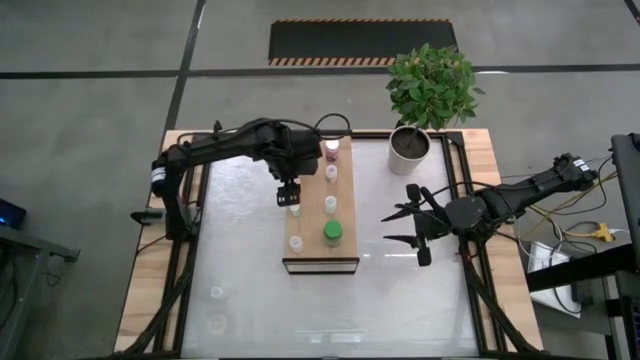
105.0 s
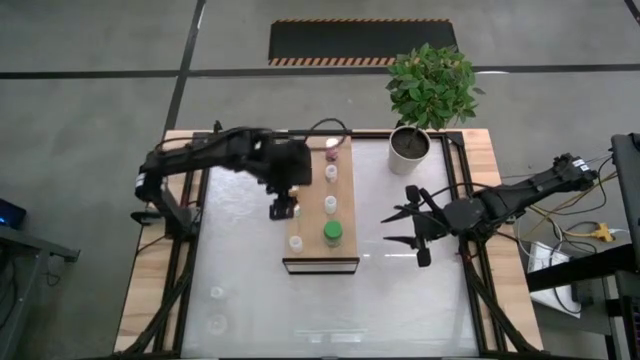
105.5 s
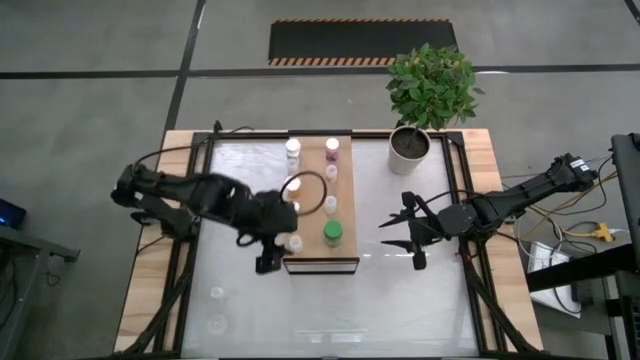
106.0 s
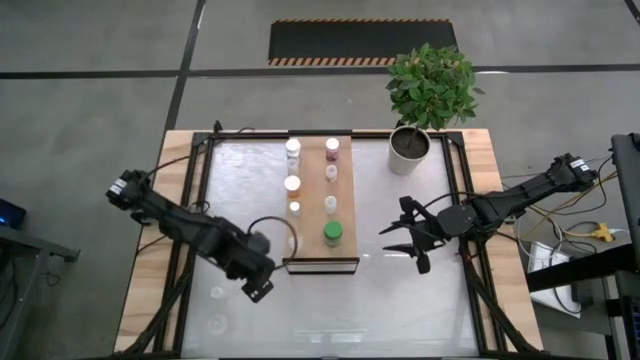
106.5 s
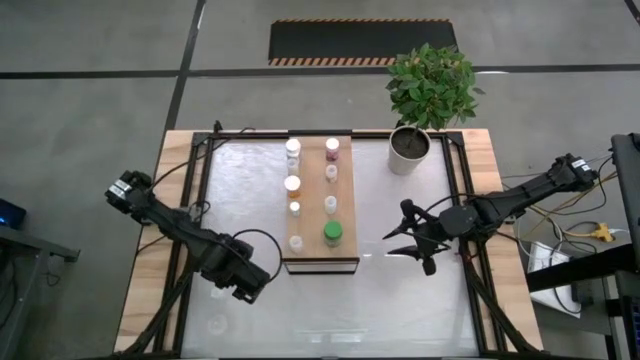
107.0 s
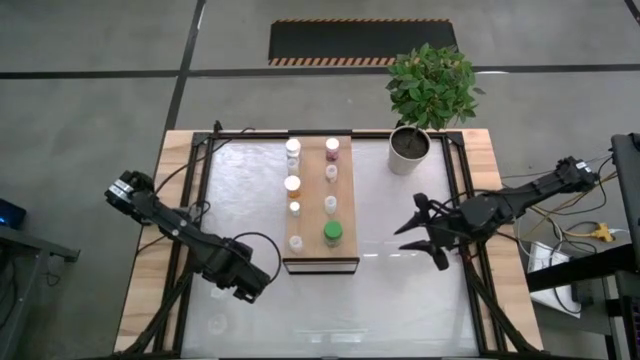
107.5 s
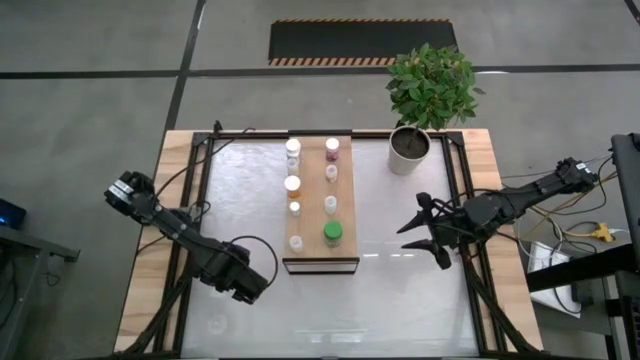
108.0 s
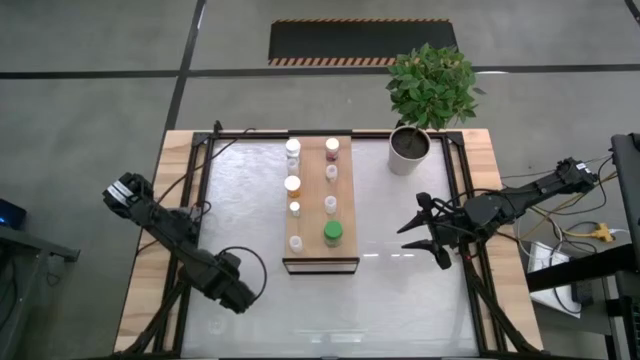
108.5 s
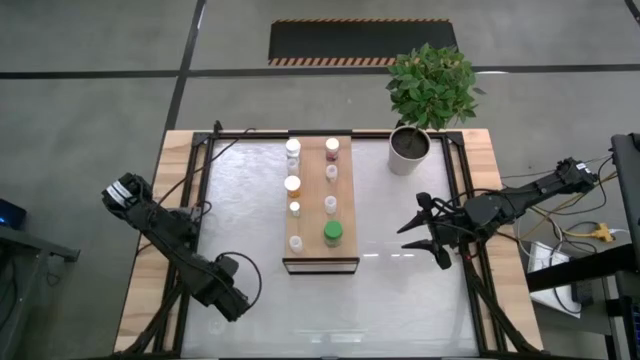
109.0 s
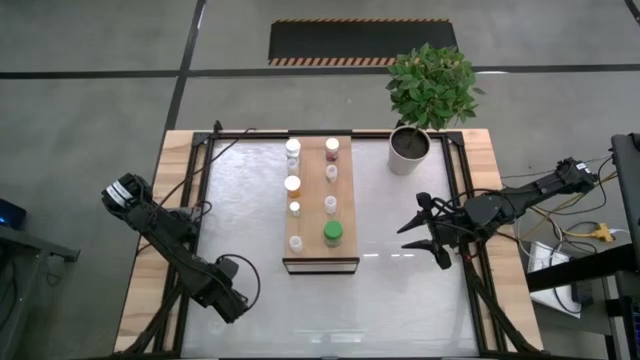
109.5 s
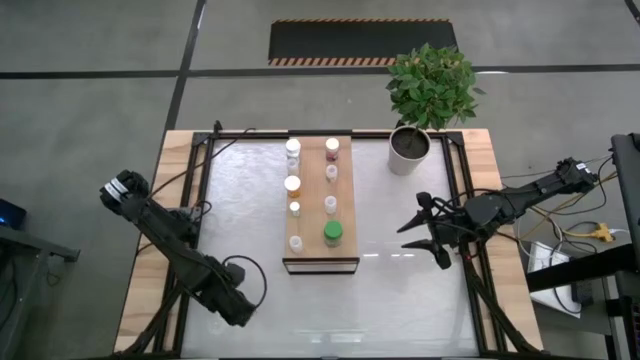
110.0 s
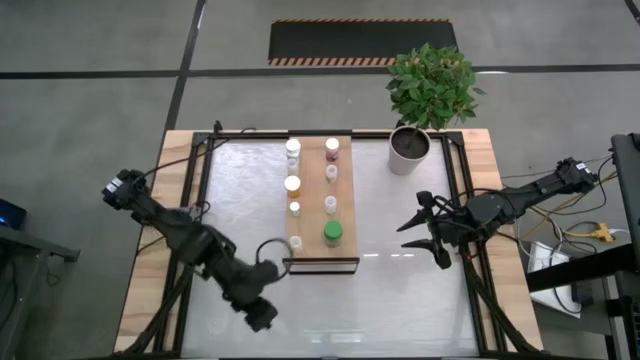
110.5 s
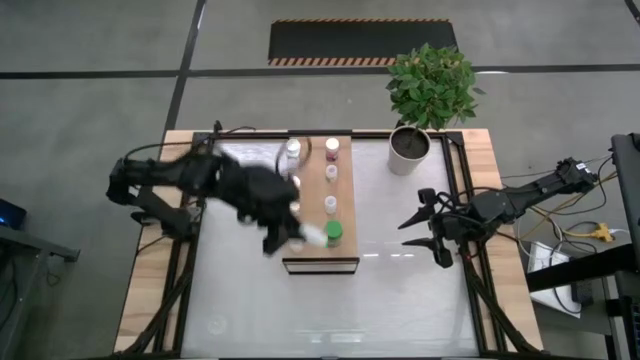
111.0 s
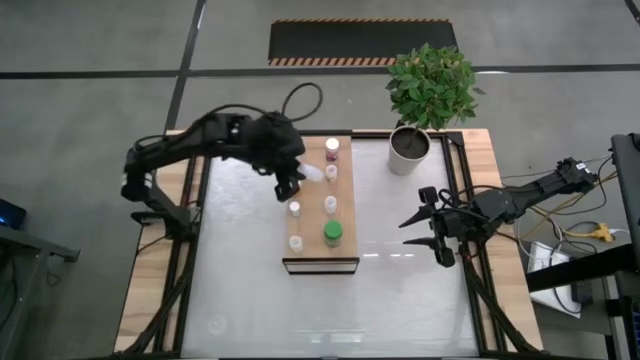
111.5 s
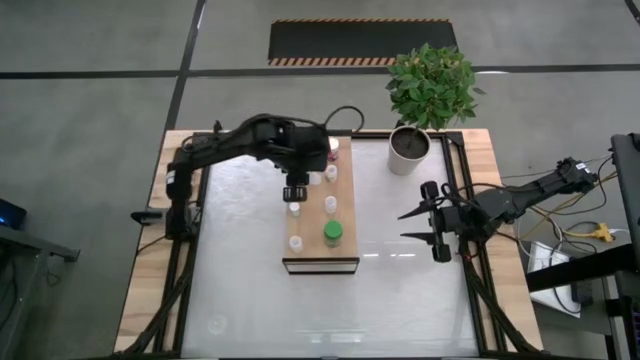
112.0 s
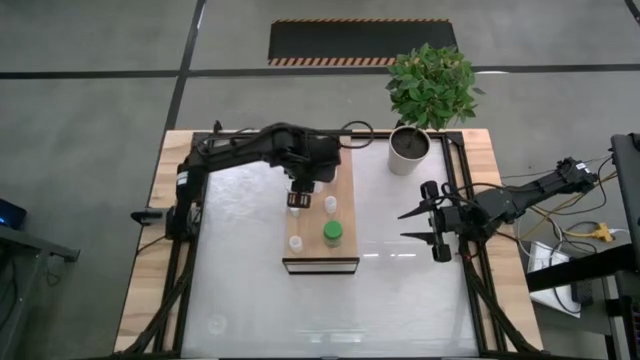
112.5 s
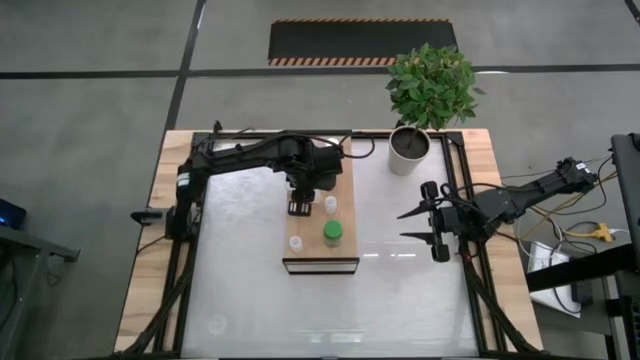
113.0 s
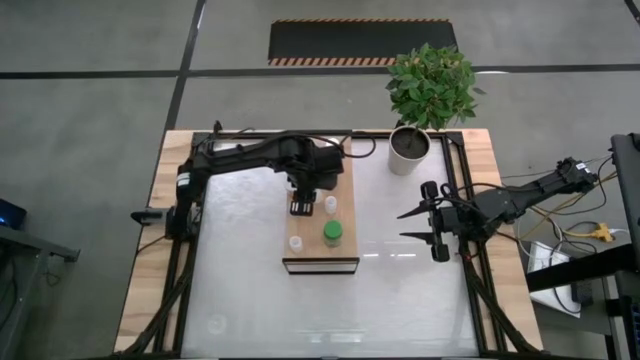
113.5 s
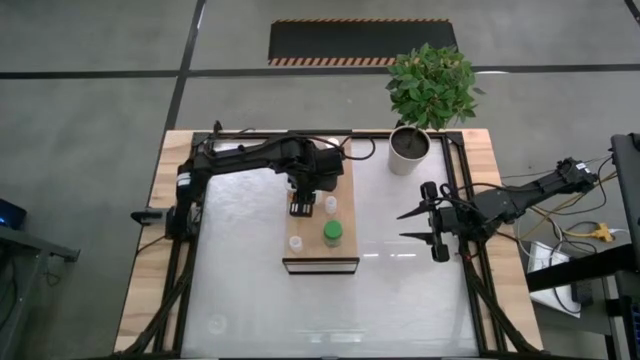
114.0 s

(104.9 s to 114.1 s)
Task: Pick and place medicine bottles onto shelf by color
Put the transparent pill bottle on the shelf

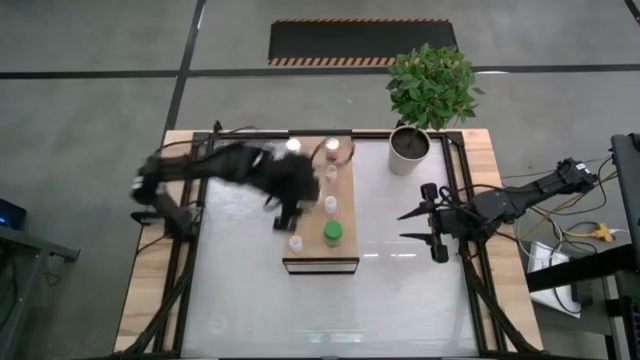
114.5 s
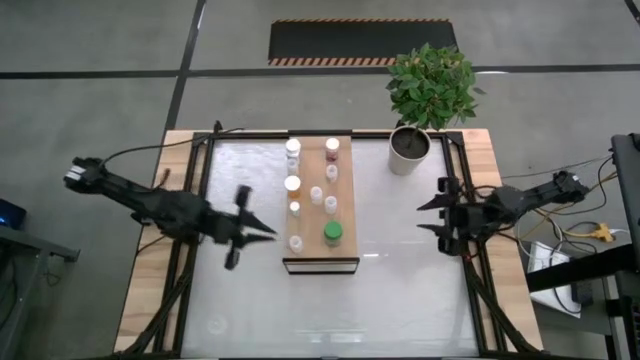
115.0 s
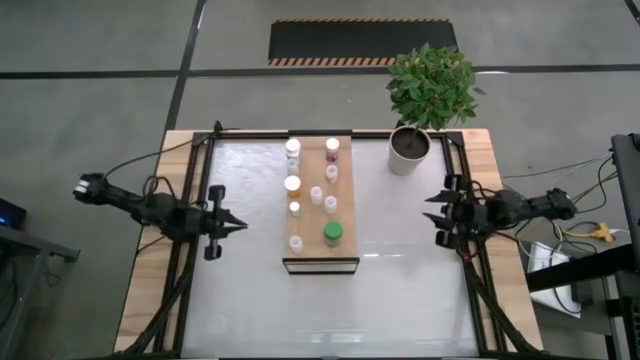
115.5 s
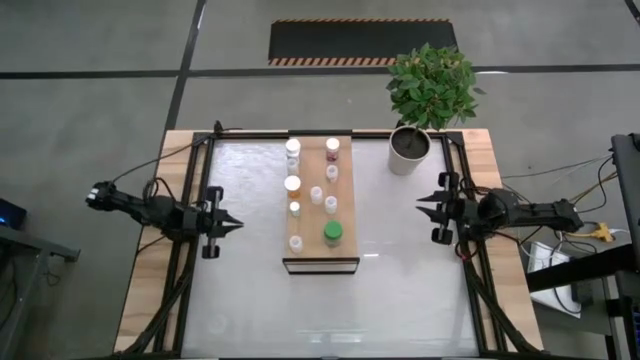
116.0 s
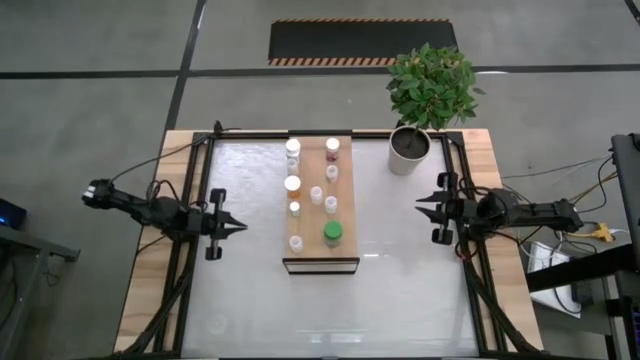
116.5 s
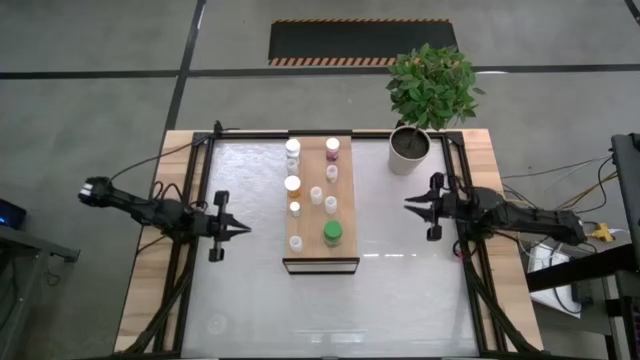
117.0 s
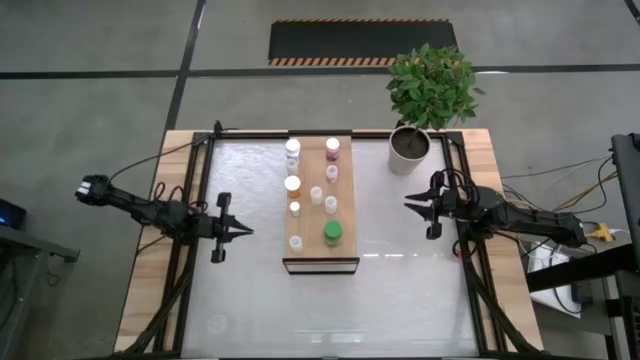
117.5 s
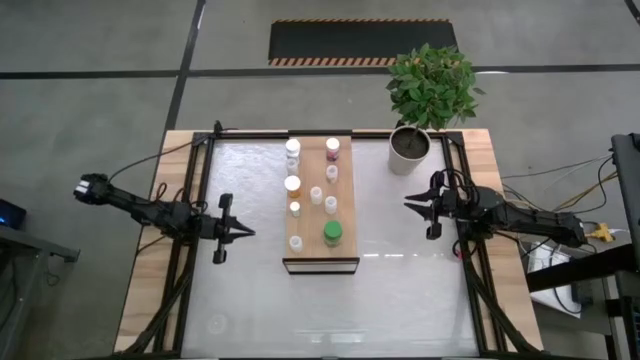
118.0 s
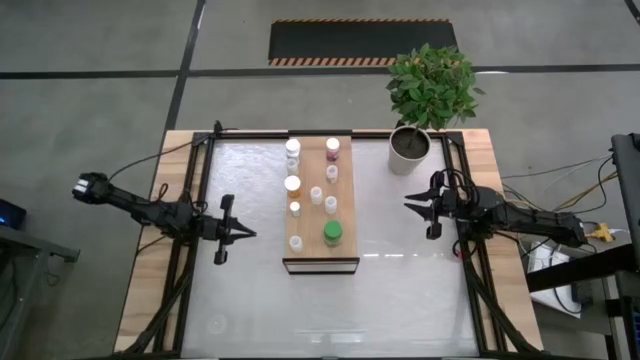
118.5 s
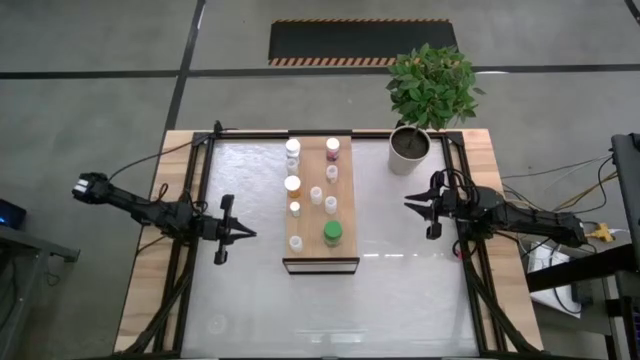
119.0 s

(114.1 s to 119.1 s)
Return to Home Position

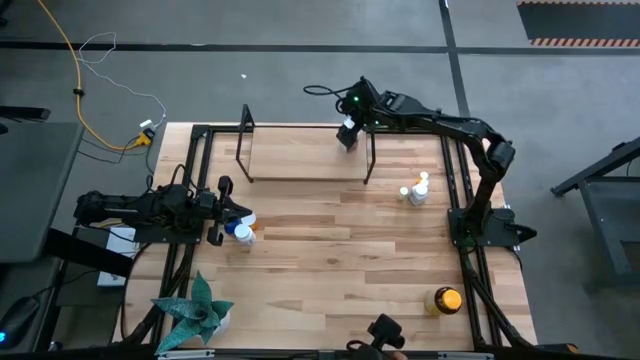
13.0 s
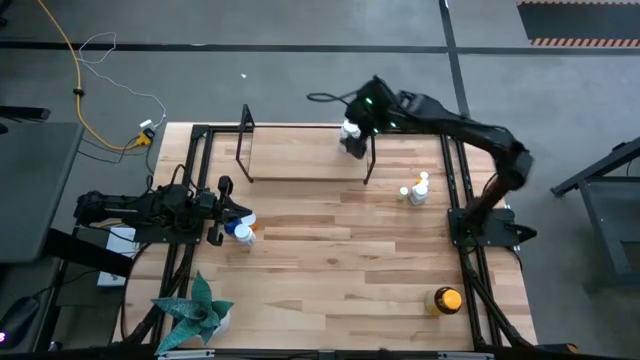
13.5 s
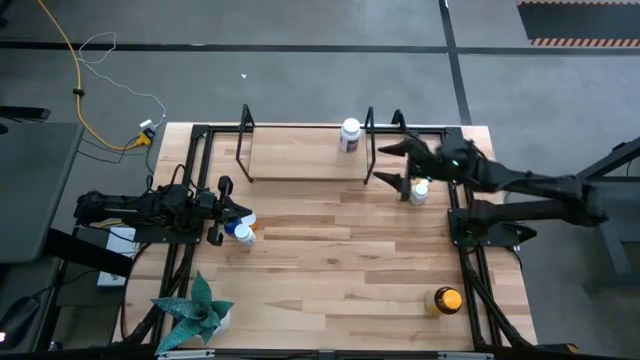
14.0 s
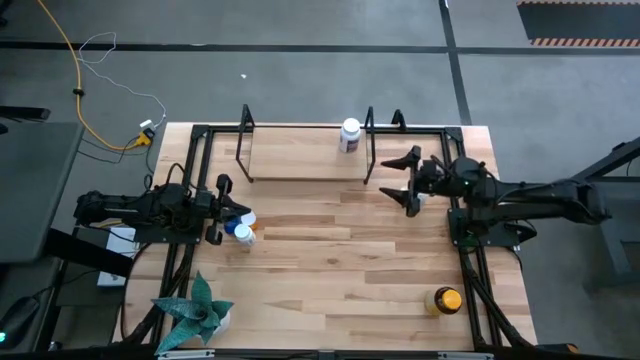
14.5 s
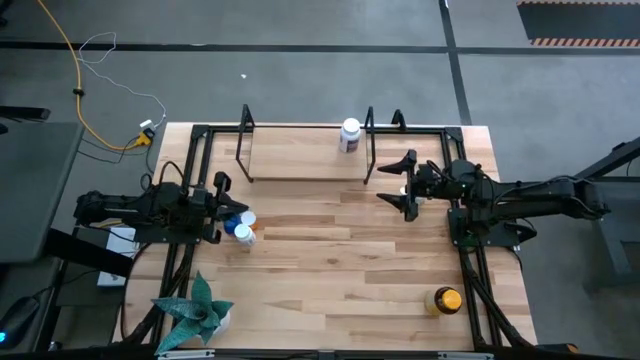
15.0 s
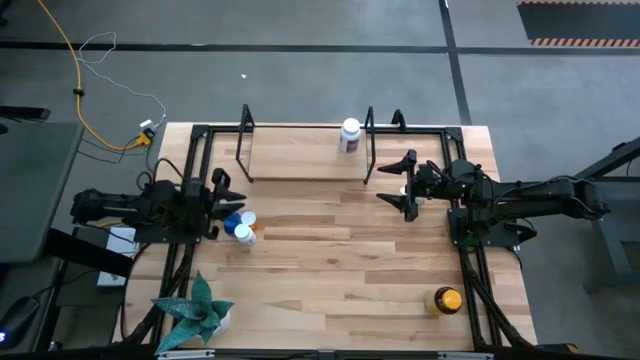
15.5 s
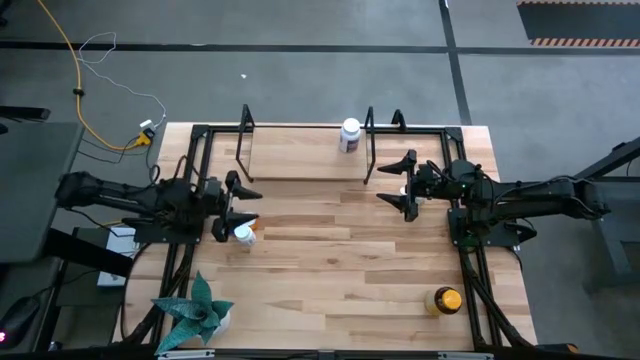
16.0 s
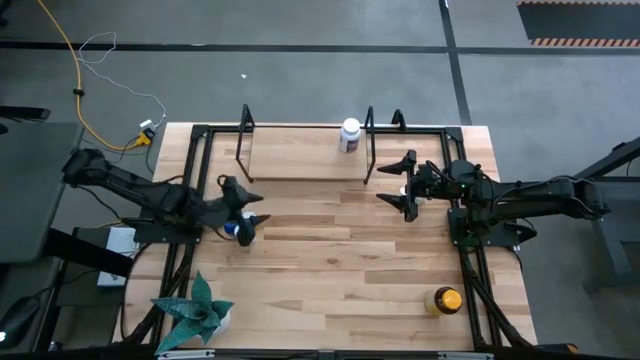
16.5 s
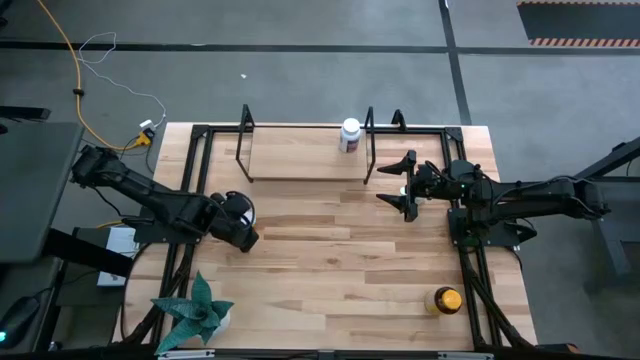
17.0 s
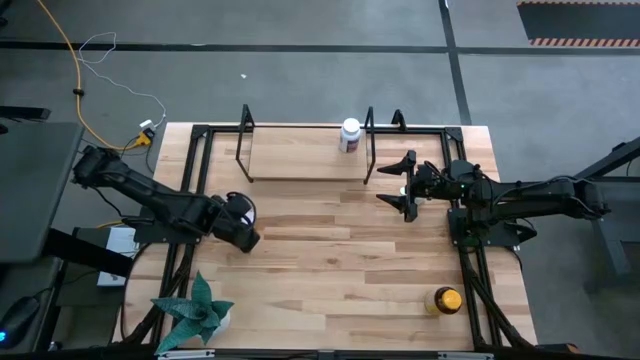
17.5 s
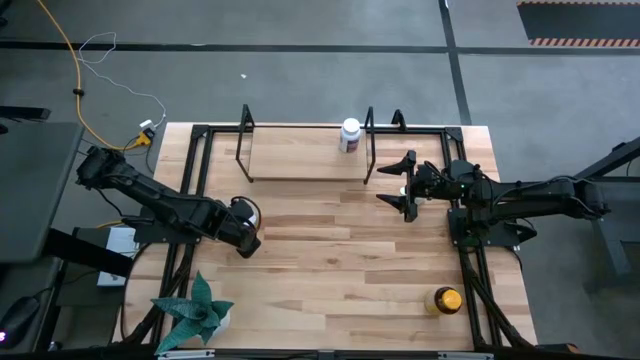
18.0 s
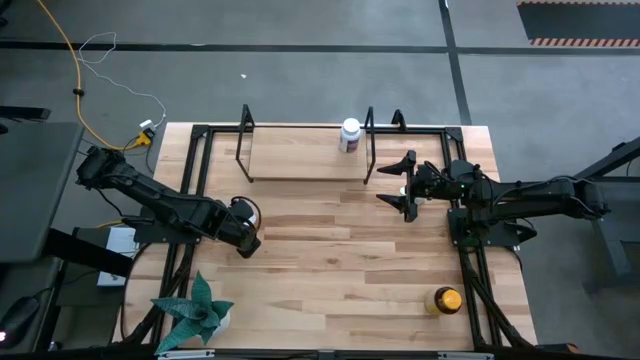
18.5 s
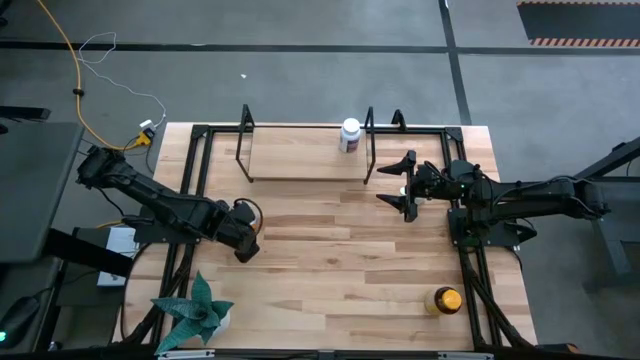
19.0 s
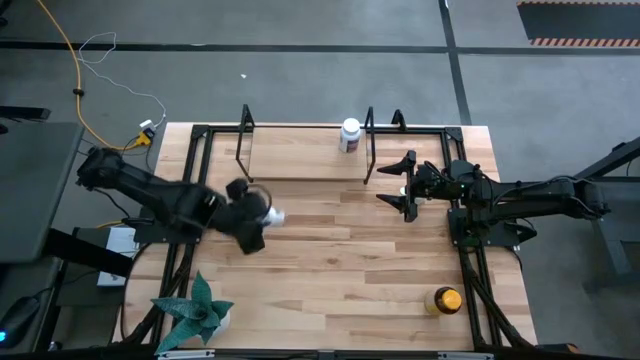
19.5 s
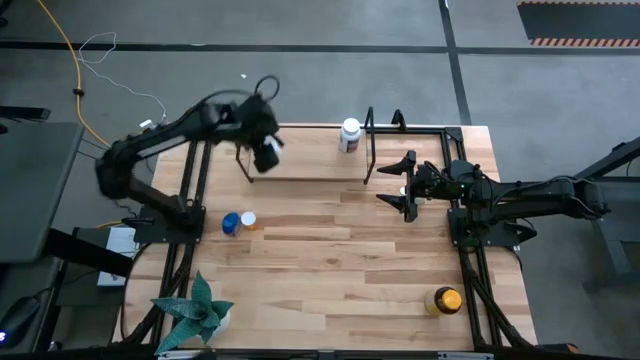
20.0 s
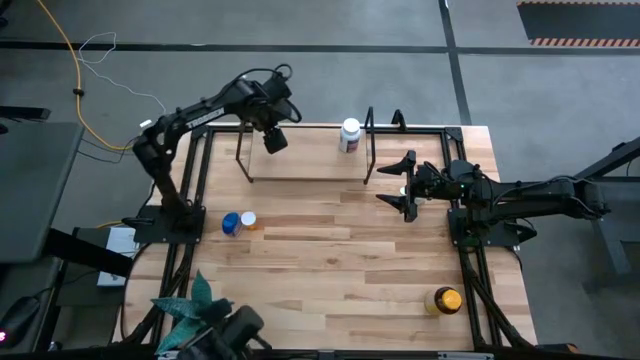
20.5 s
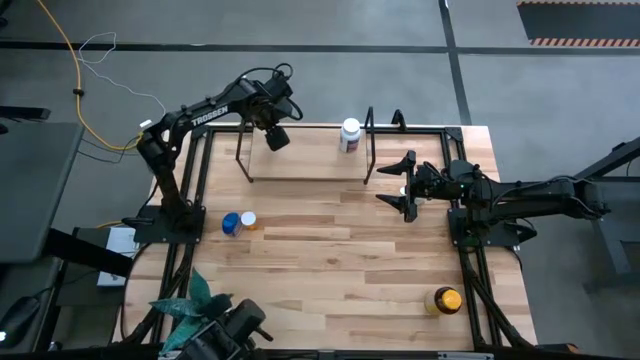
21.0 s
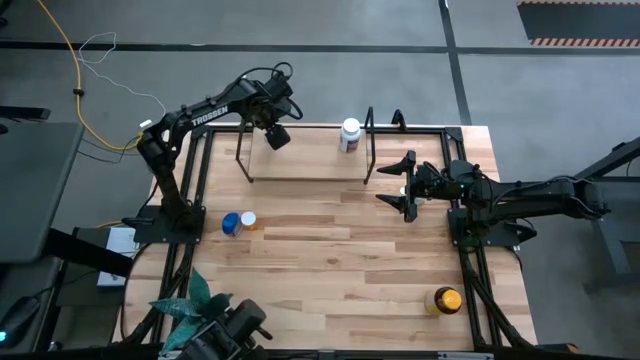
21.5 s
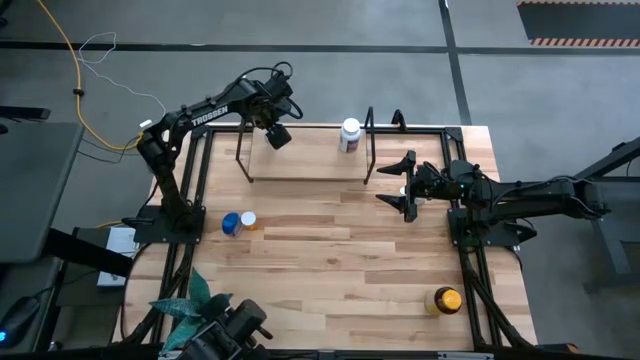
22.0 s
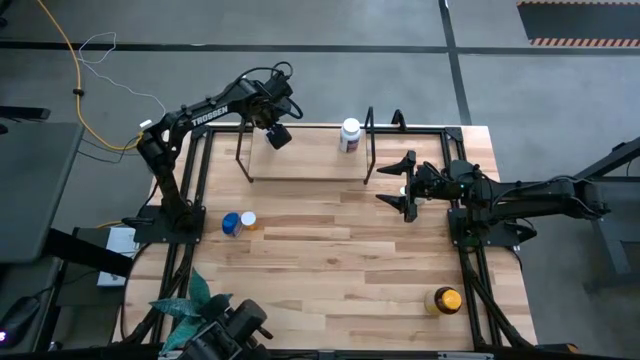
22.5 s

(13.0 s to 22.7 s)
Task: Pick and place medicine bottles onto shelf by color
Put the left small white pill bottle on the shelf
